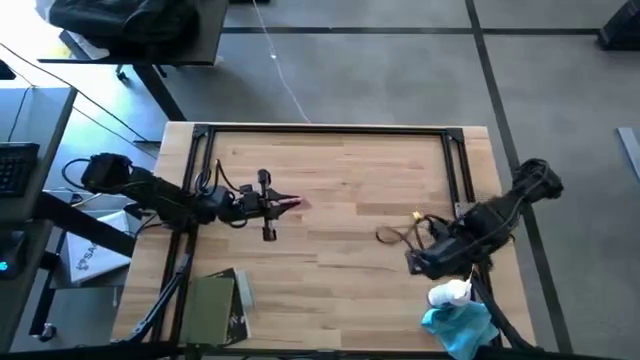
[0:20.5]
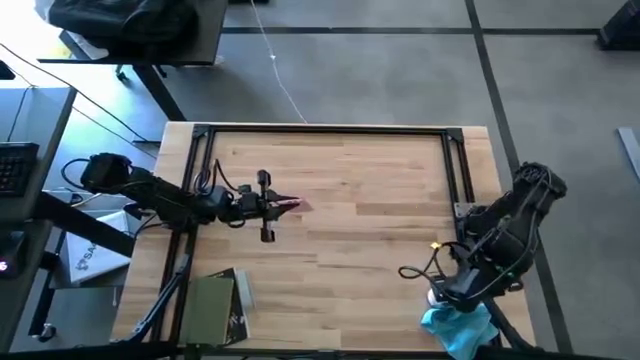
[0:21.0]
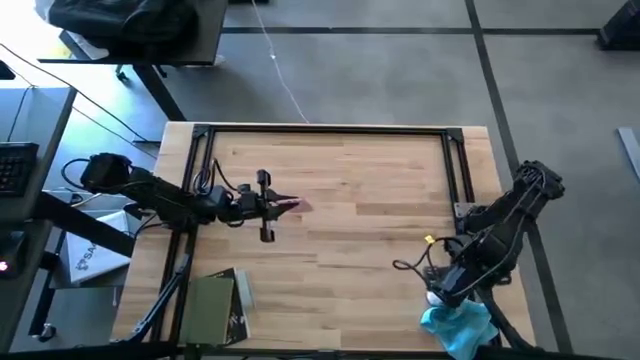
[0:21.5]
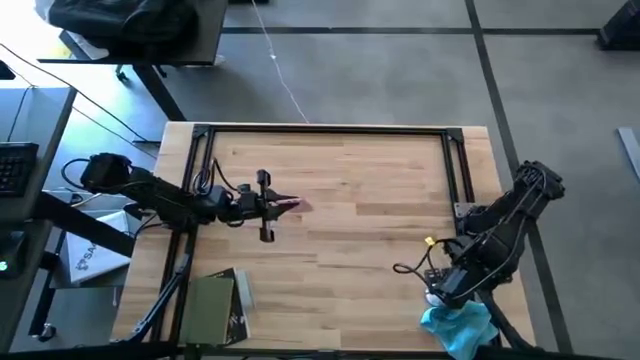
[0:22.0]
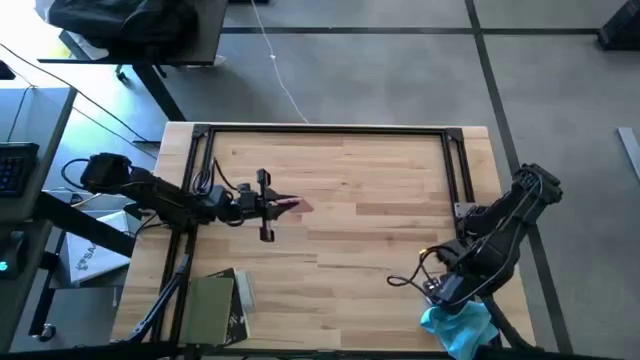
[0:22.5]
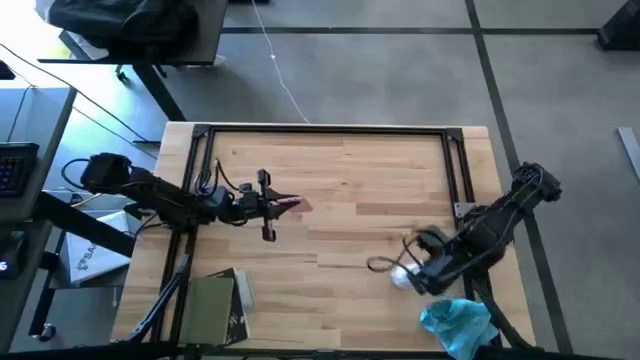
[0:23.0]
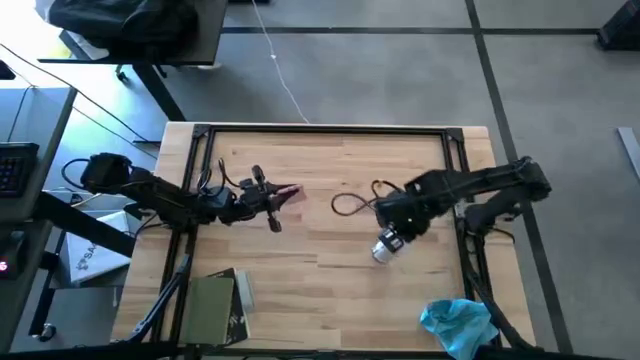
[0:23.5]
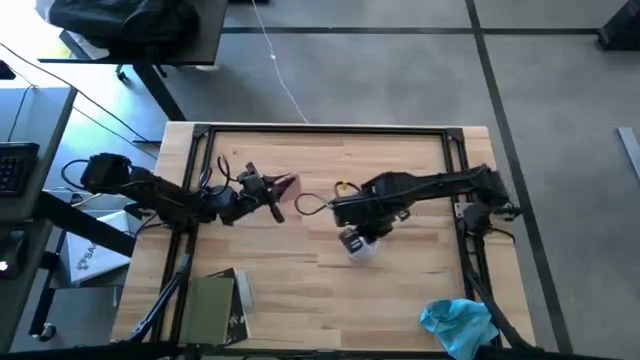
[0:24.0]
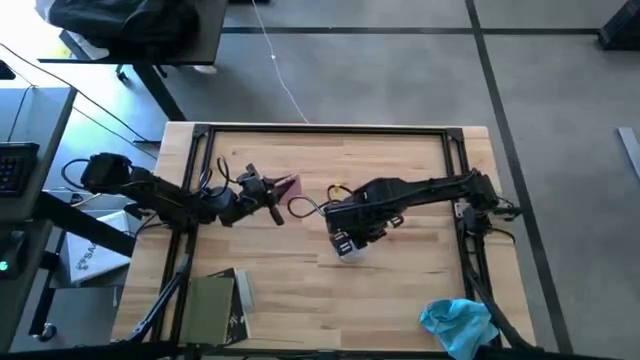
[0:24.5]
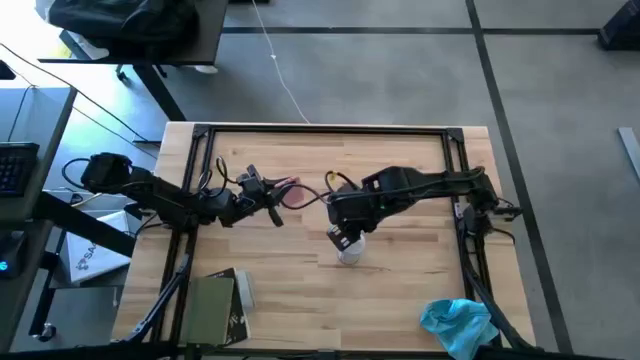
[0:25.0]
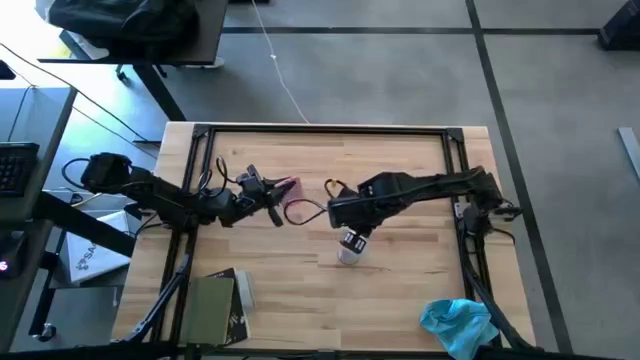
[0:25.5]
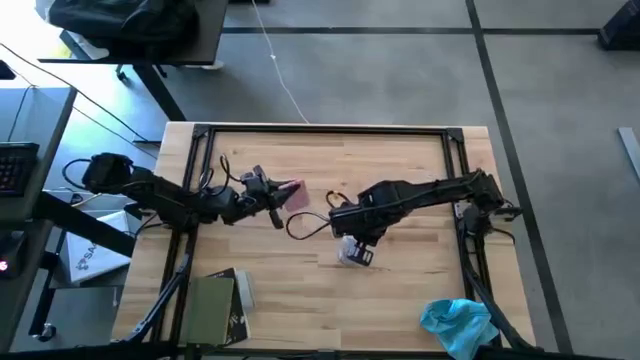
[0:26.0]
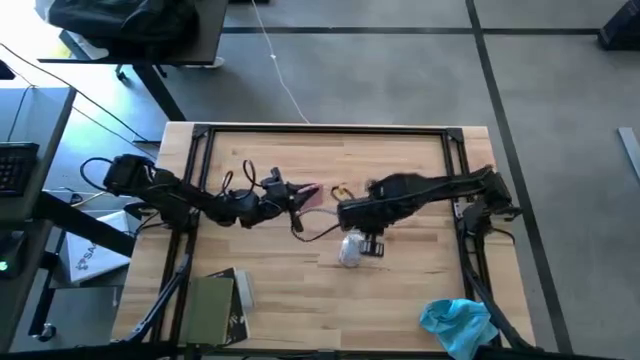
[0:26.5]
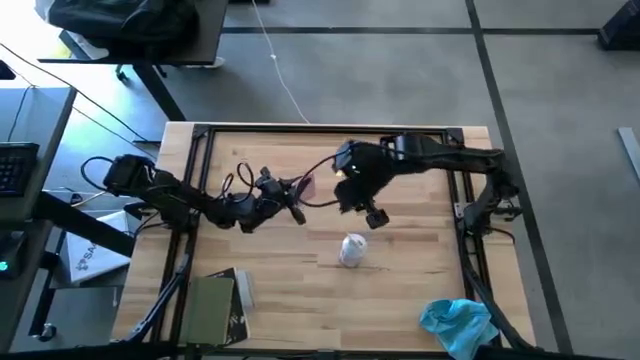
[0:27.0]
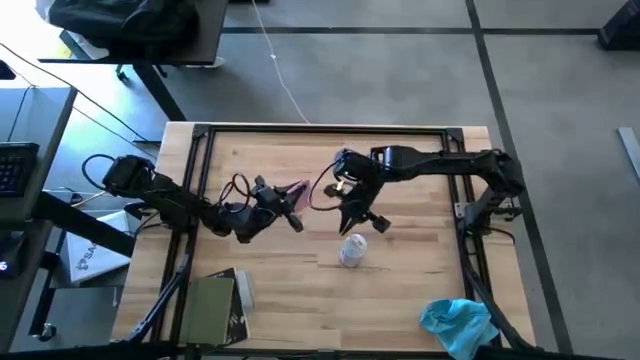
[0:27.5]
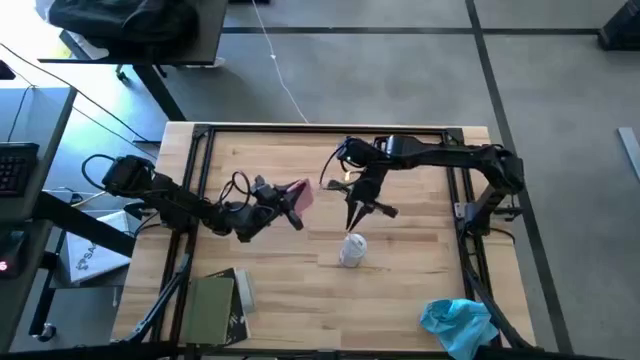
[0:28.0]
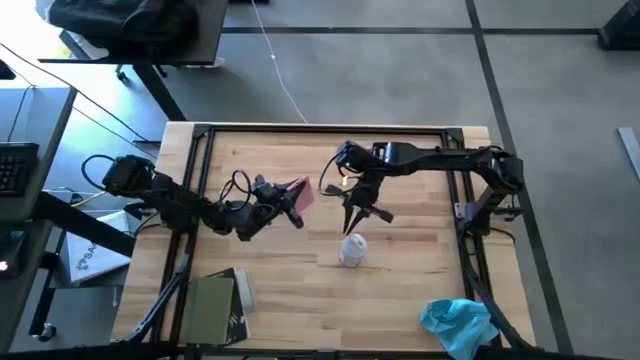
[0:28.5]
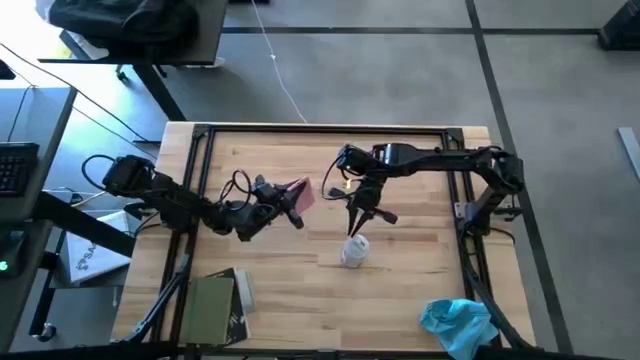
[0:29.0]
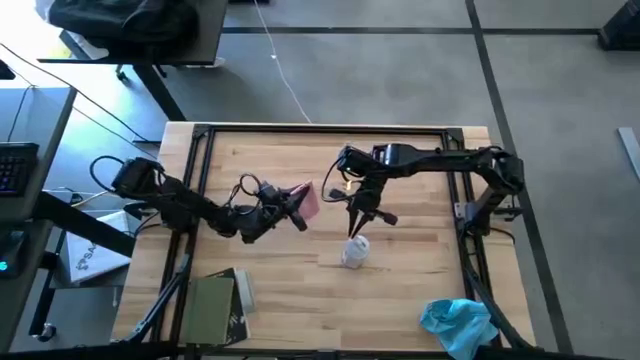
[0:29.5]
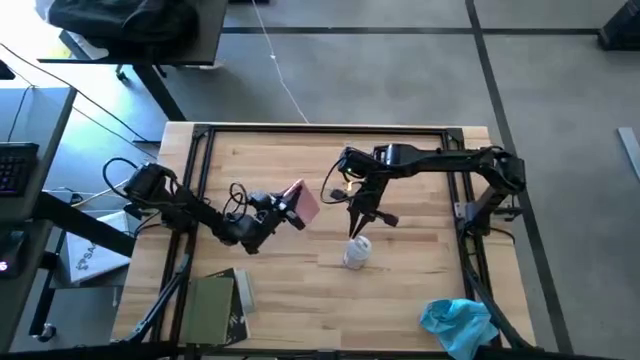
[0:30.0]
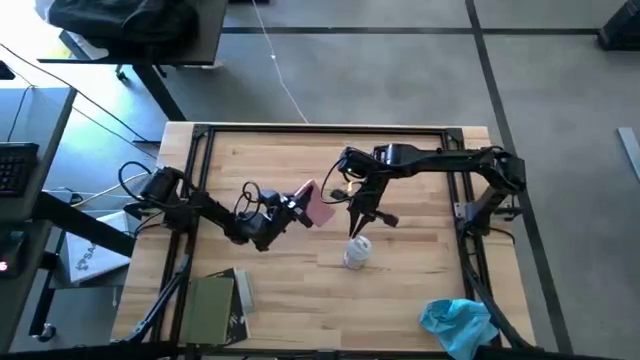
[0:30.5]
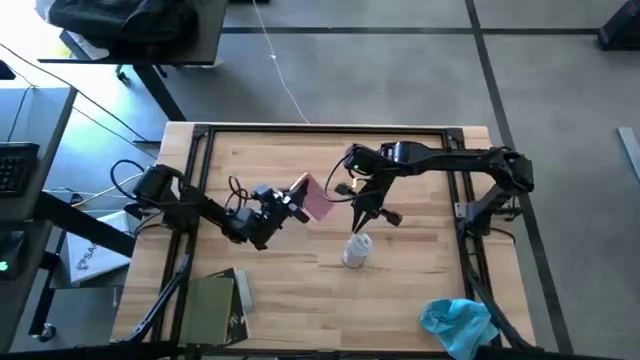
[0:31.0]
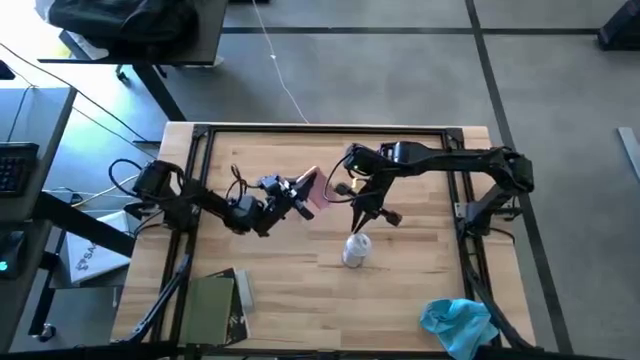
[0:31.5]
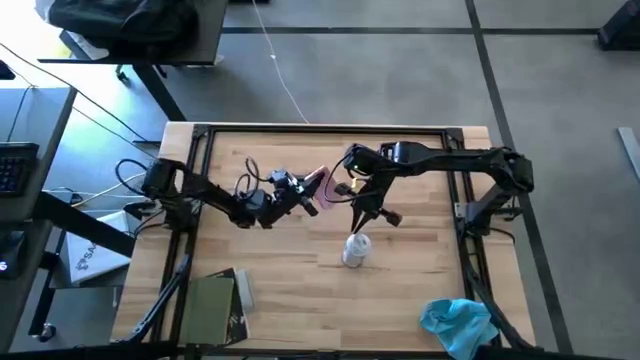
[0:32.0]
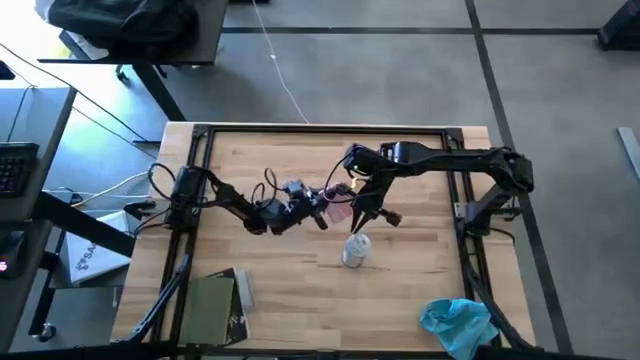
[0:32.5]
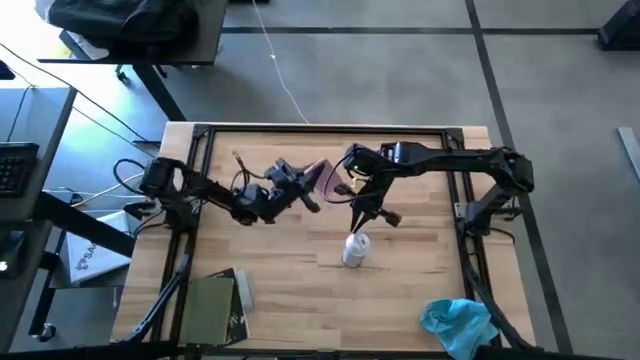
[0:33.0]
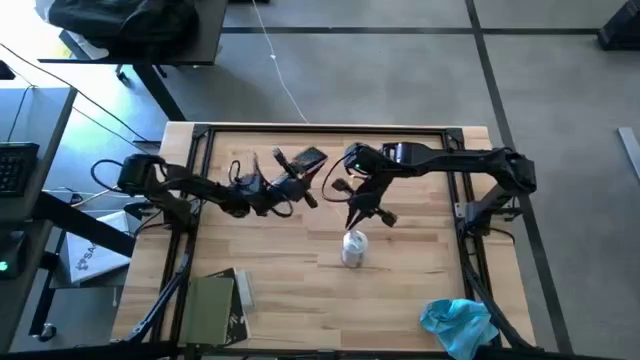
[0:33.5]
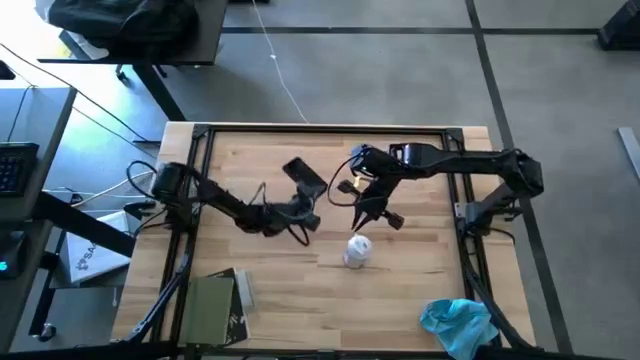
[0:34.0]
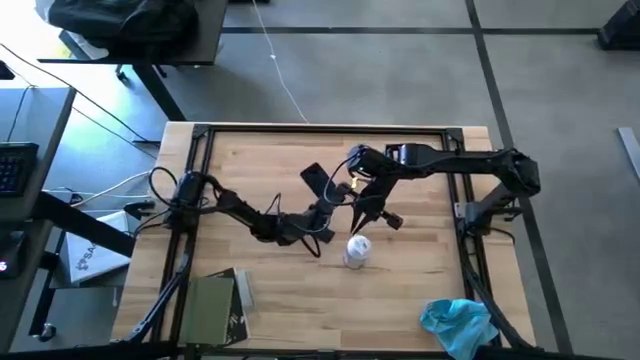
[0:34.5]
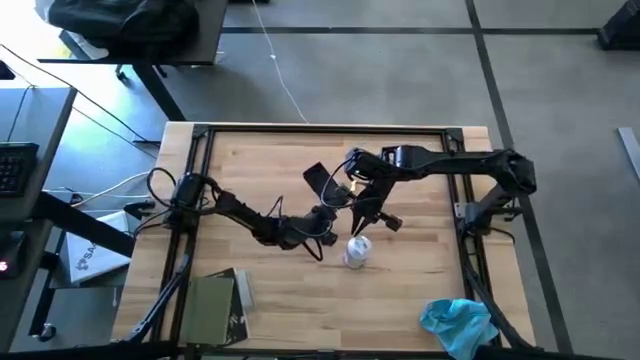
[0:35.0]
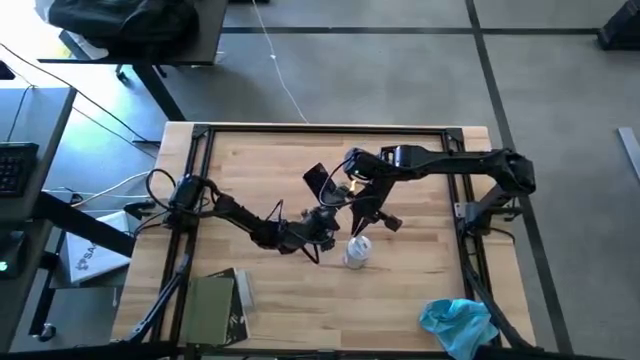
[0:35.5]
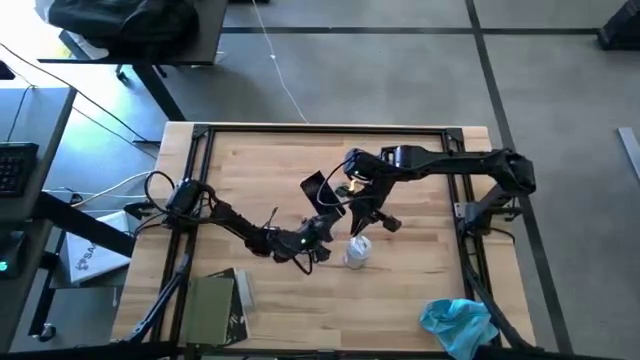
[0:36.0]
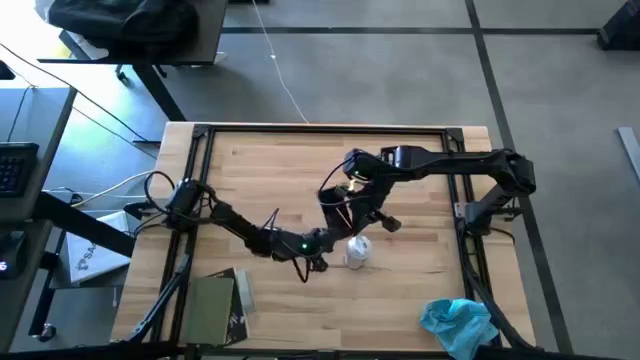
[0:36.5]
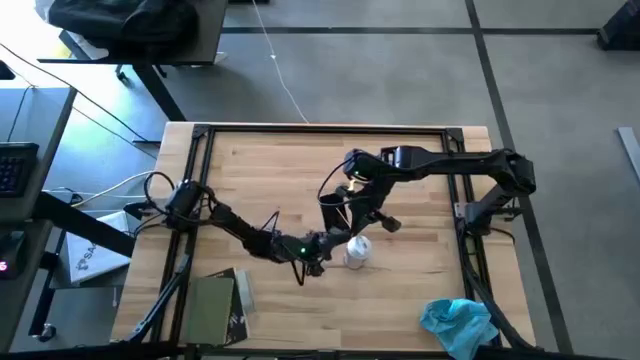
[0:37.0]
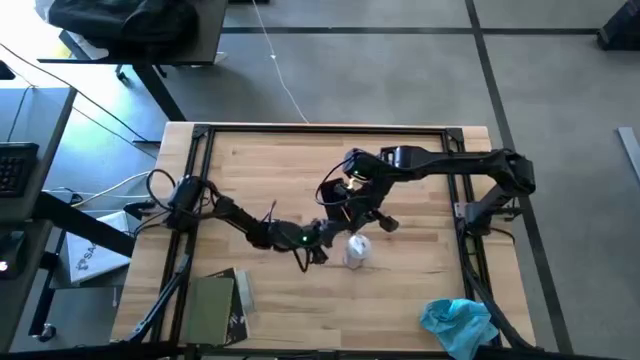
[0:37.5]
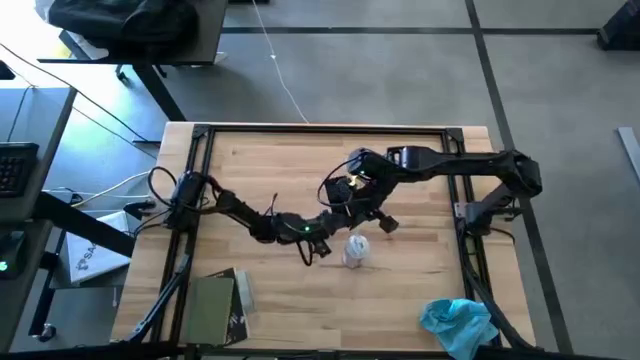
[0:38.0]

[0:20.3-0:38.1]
Task: Apply microfiber cloth
Spray the pink cellphone using the spray bottle
